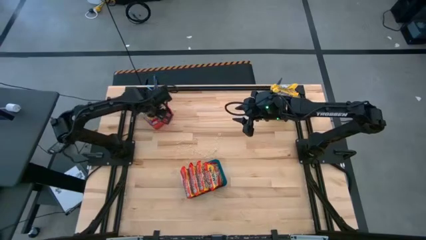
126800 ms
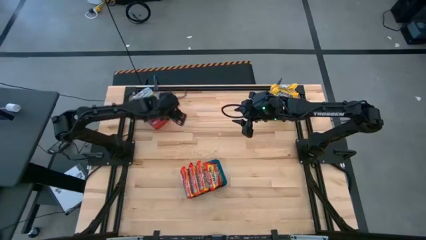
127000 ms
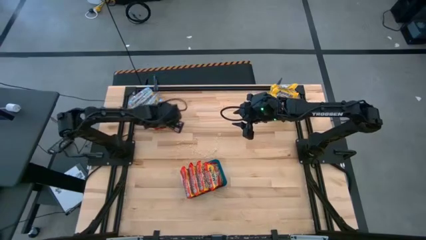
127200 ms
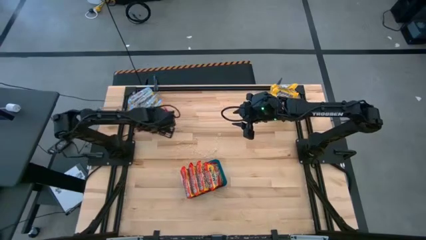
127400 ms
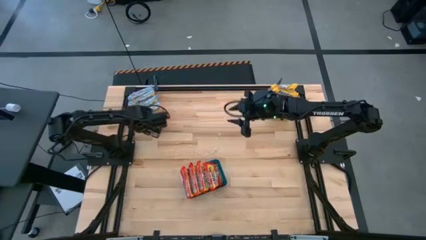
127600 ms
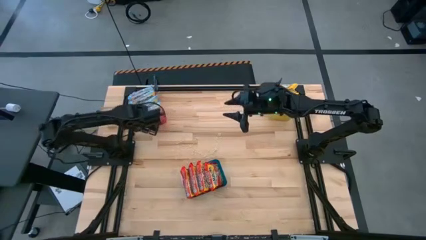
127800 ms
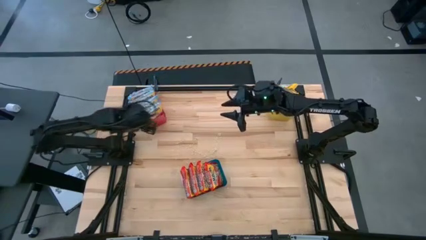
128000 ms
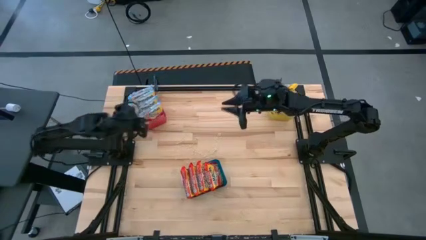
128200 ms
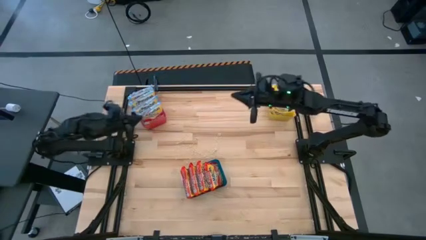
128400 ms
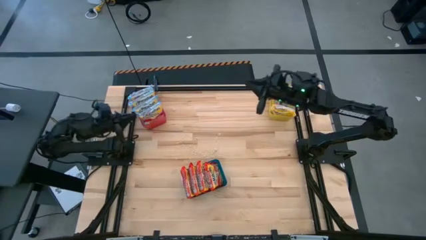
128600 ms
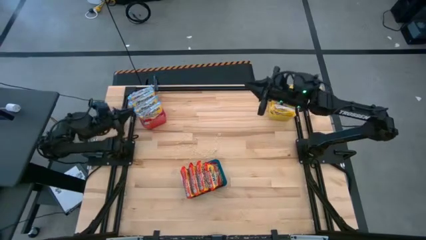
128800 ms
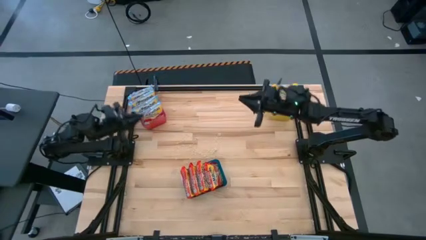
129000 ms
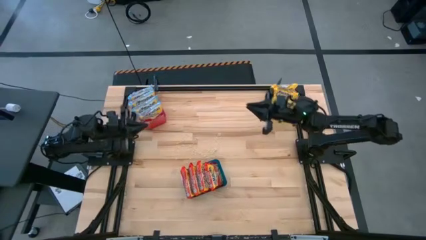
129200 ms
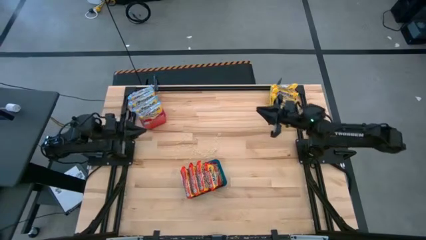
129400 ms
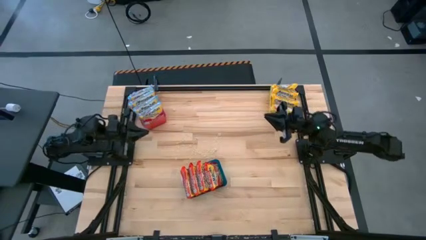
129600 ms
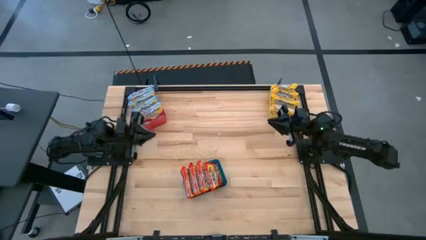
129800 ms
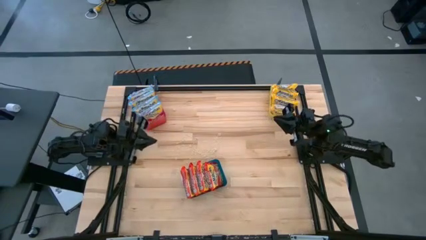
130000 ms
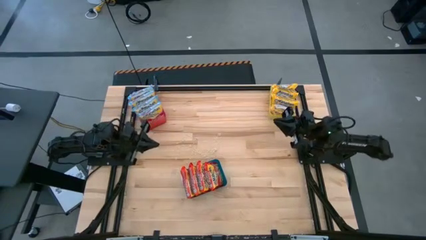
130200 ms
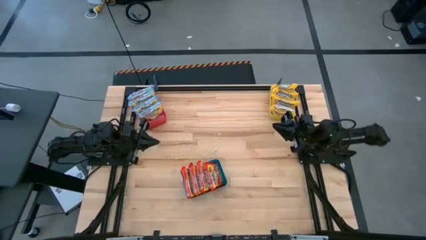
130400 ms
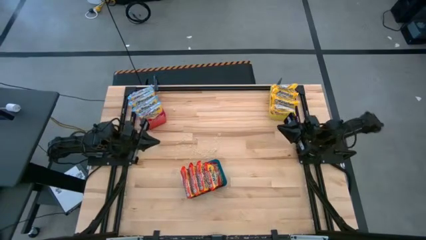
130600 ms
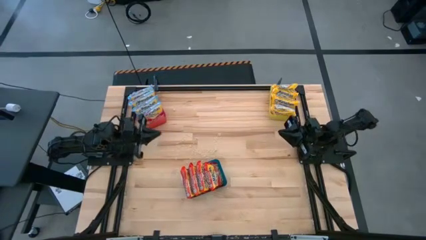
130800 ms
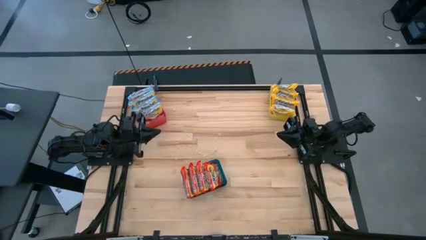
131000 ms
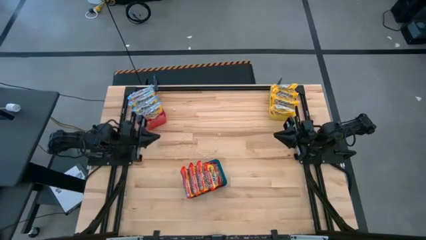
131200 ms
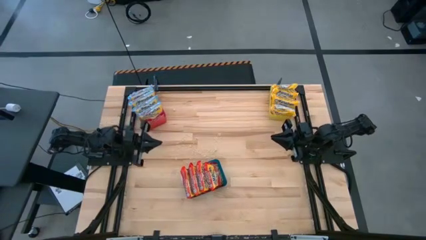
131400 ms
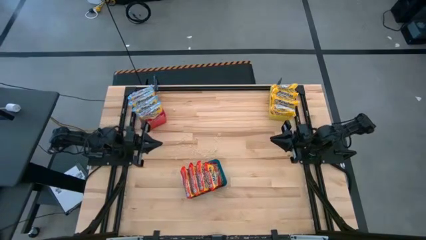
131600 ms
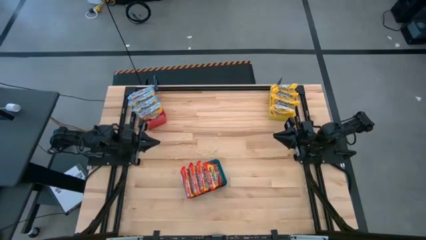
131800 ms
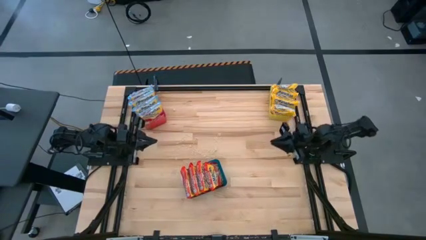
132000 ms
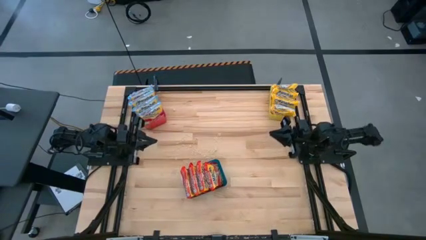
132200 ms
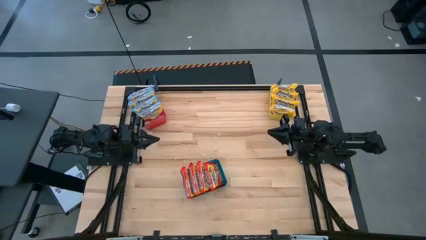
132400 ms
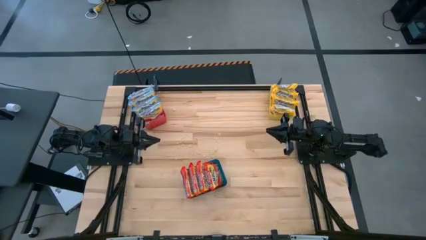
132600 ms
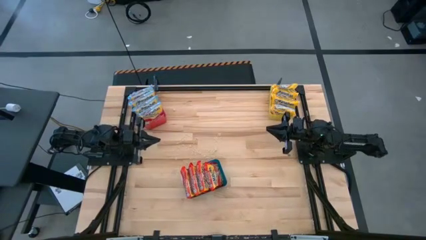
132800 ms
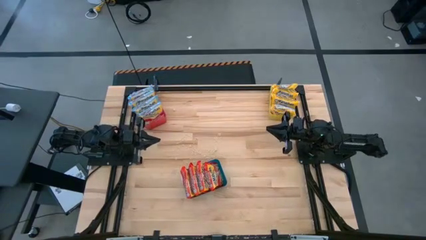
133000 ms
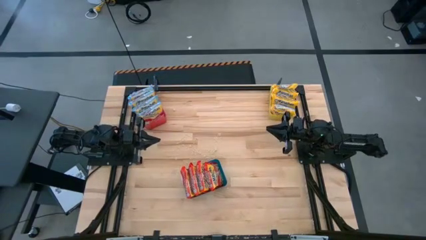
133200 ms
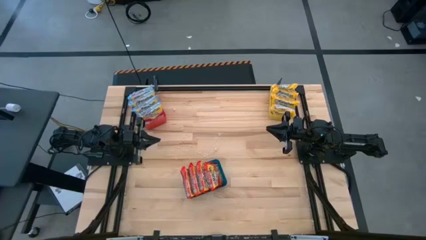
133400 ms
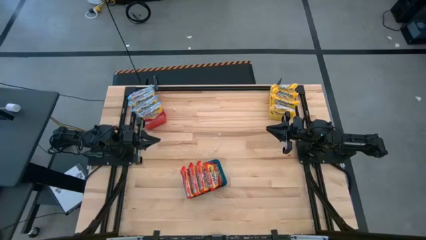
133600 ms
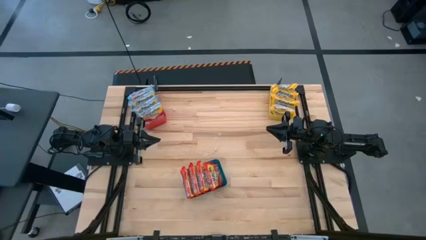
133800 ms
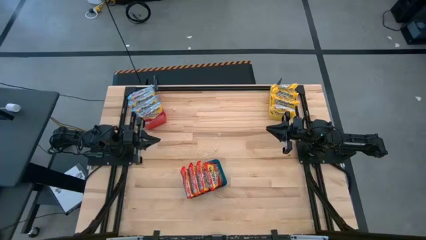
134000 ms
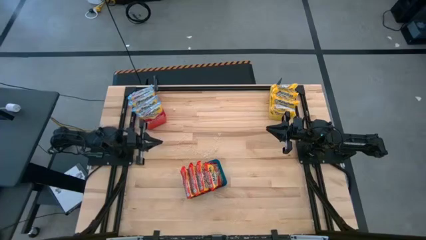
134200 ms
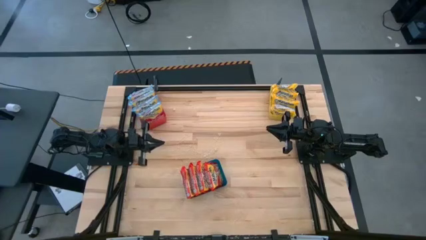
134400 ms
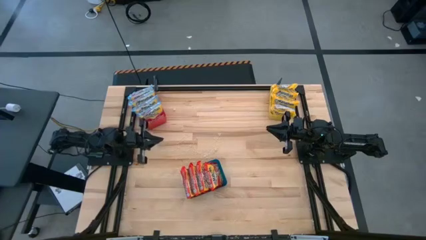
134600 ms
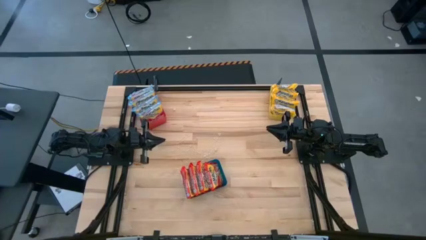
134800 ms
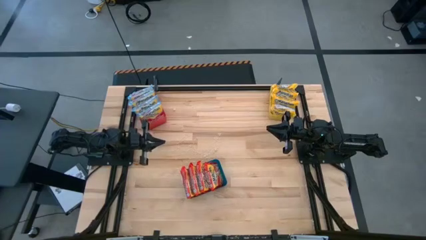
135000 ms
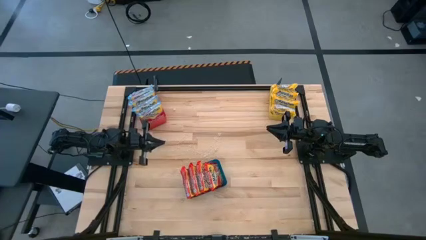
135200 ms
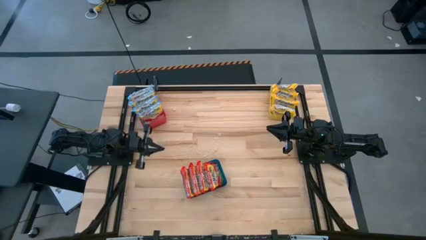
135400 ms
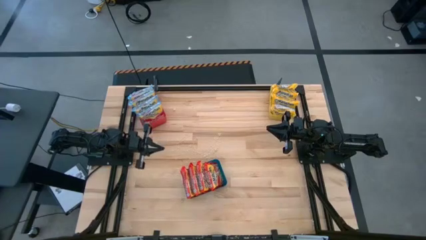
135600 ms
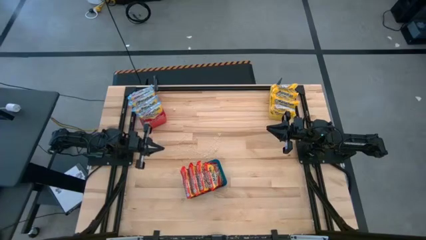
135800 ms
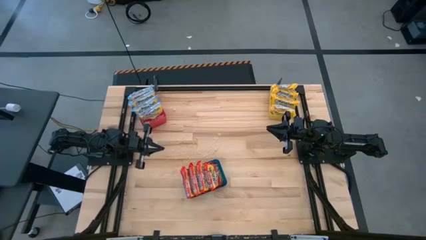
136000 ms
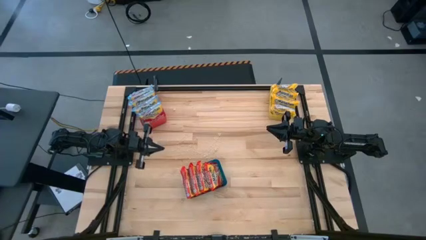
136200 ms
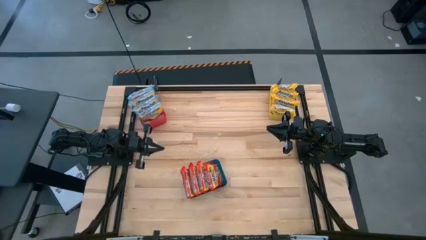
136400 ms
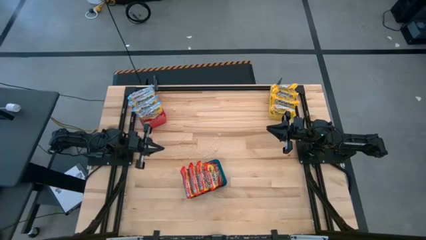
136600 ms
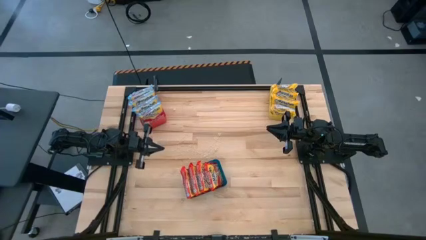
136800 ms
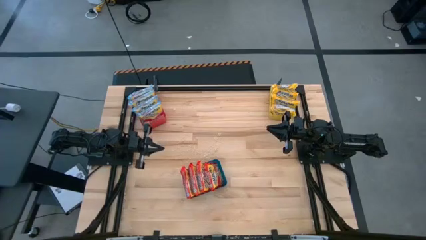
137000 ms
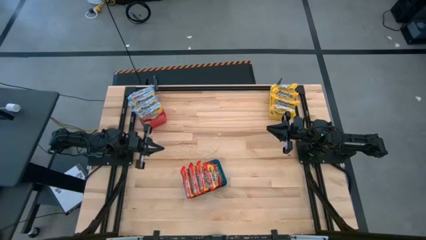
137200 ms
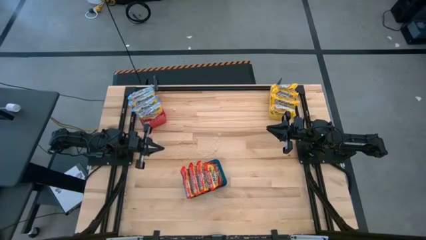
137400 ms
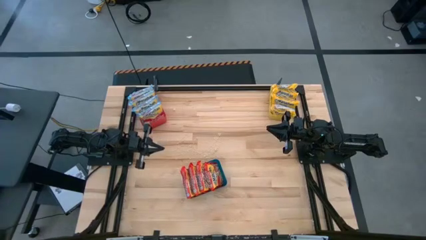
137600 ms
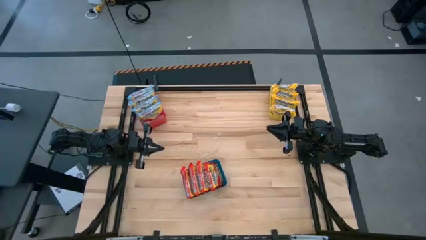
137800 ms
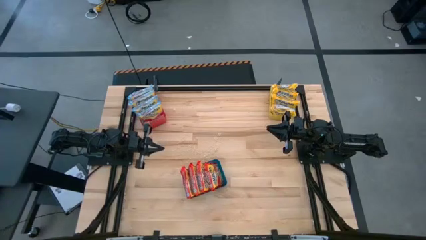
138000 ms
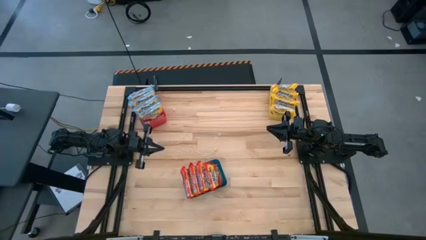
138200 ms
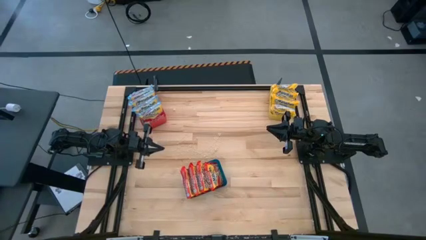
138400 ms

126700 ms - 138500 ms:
Task: Sort Maruchan noodles
Return to Home Position

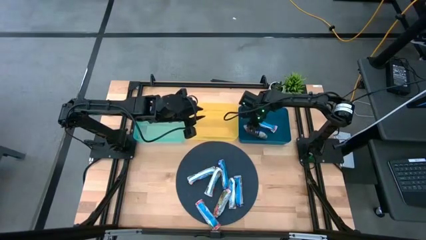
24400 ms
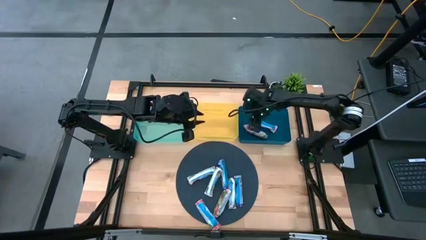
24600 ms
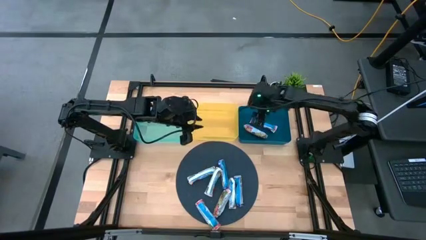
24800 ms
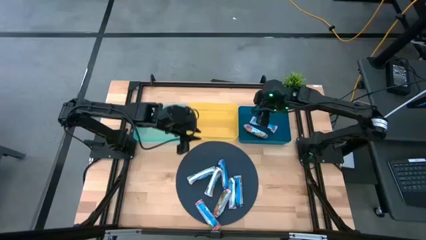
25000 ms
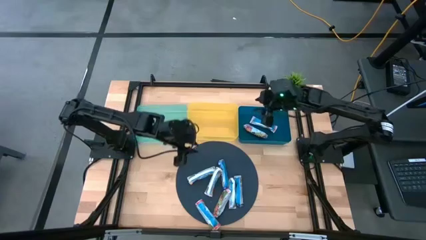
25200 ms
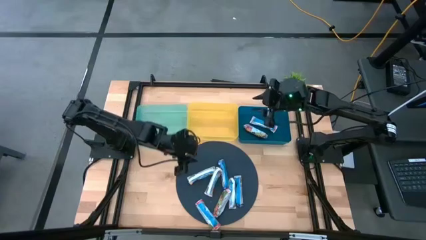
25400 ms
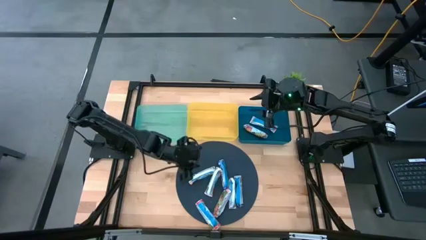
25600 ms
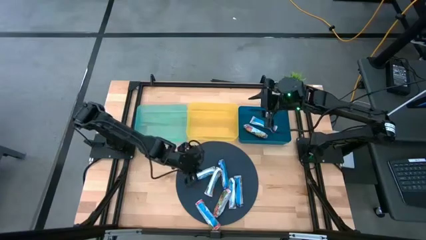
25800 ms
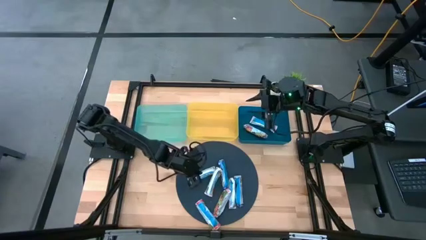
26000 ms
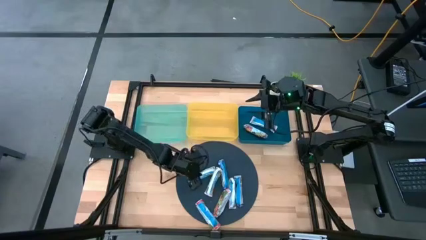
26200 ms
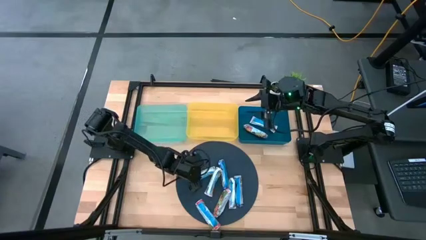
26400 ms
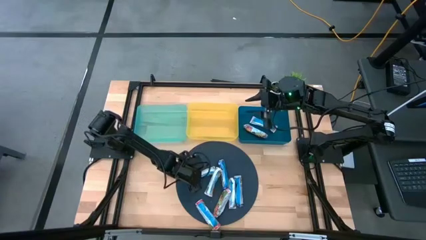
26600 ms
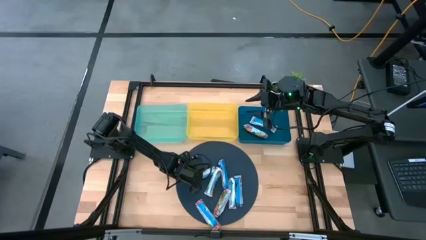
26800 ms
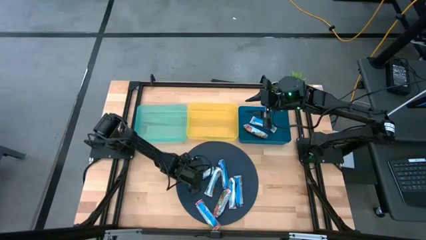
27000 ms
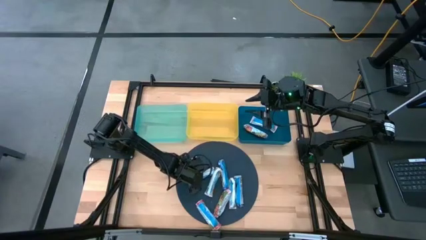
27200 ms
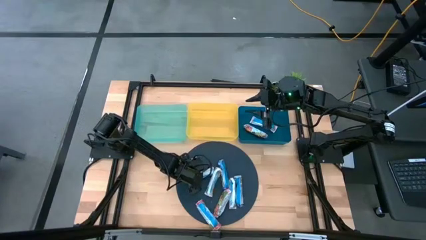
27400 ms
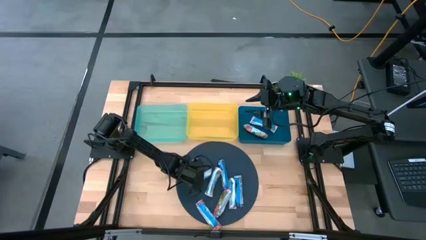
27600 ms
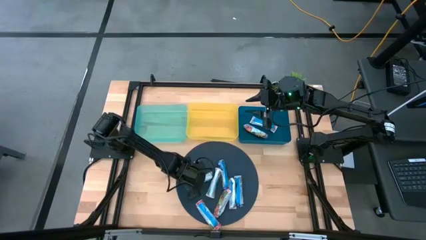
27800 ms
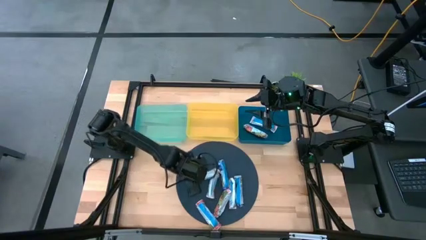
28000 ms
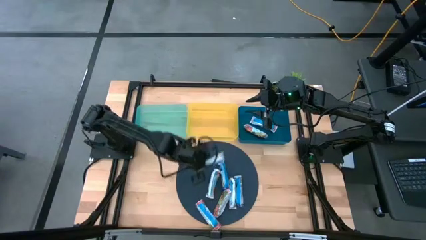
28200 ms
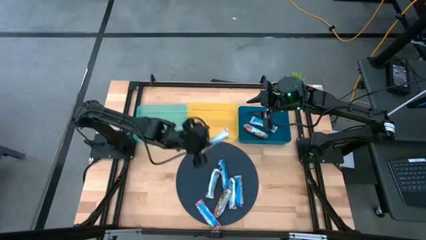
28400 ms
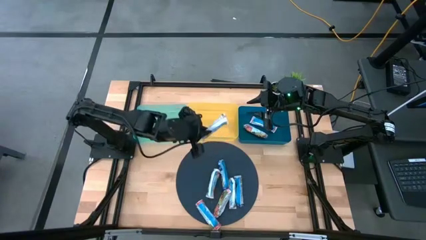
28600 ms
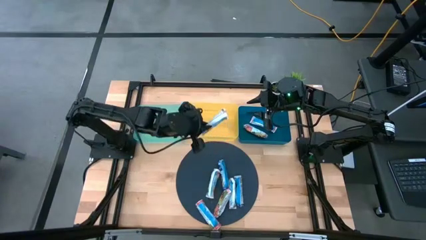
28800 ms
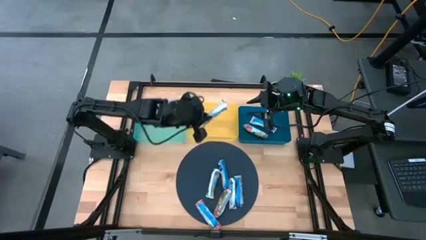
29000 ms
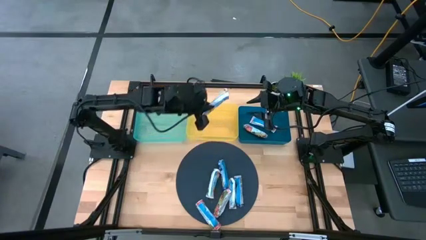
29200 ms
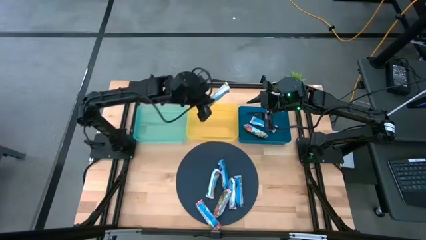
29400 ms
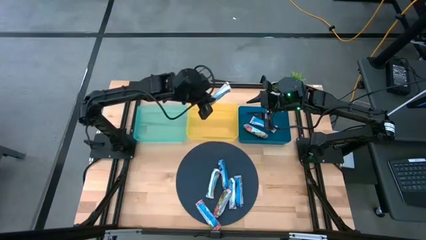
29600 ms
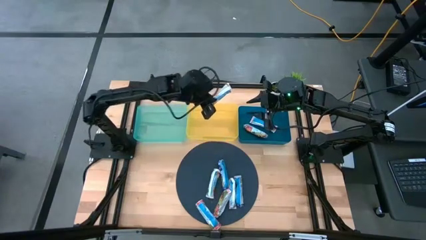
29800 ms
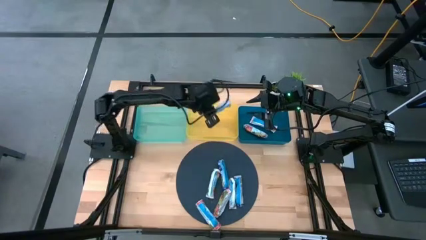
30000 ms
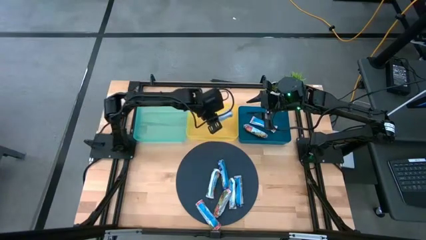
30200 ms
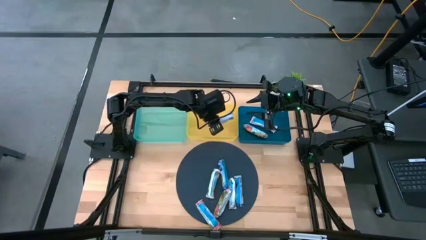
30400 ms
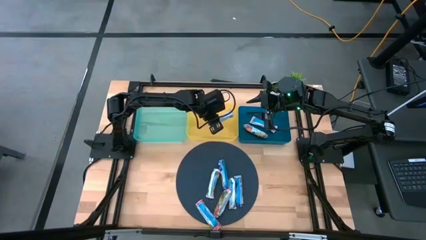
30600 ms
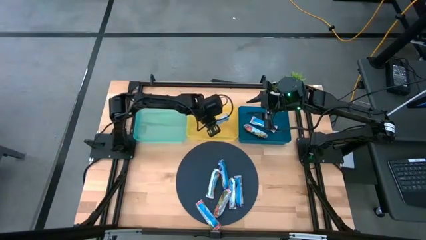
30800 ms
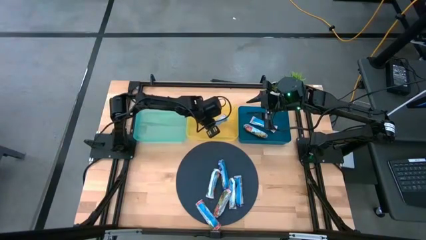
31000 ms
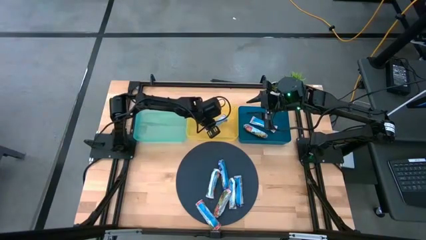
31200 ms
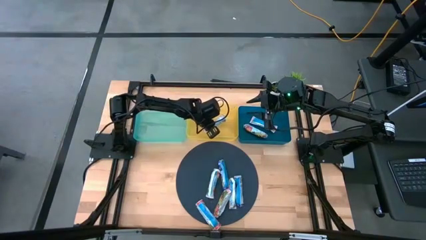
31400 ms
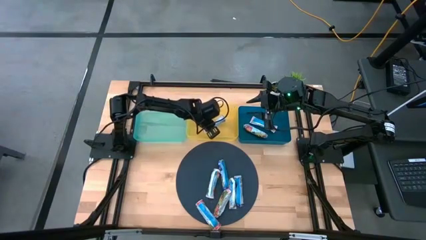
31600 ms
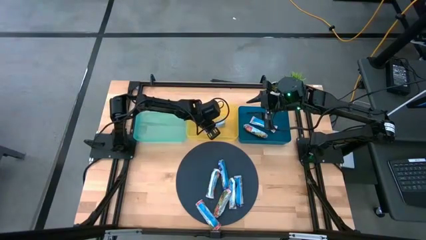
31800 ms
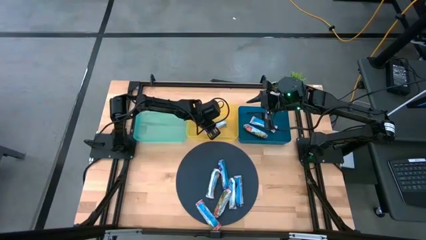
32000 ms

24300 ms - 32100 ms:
Task: Pick and place Granola Bars by type
Put the orange granola bar into the yellow bin
